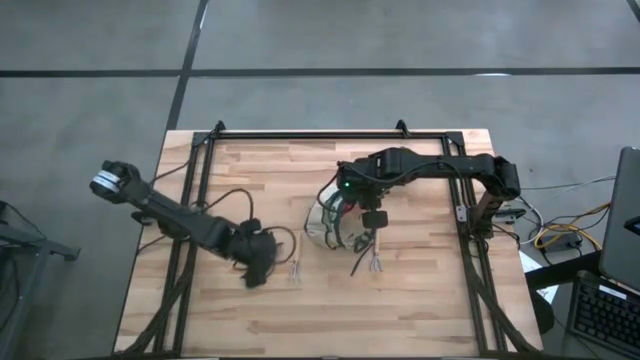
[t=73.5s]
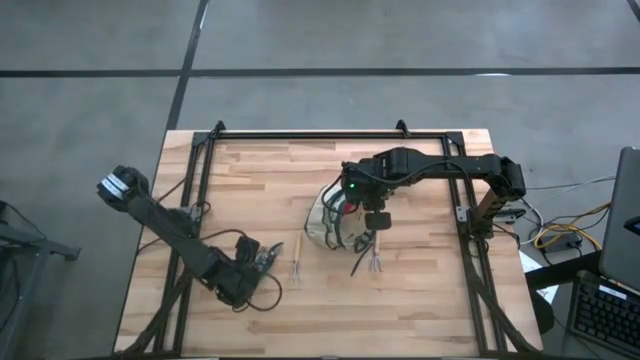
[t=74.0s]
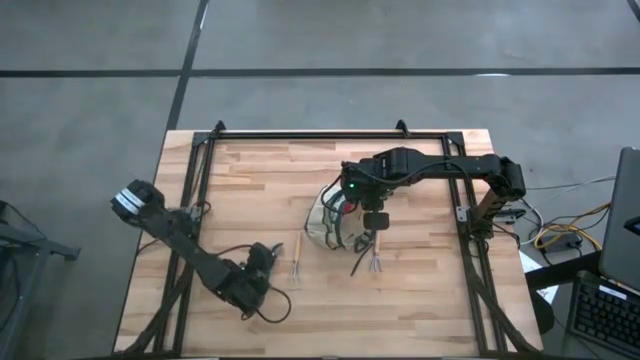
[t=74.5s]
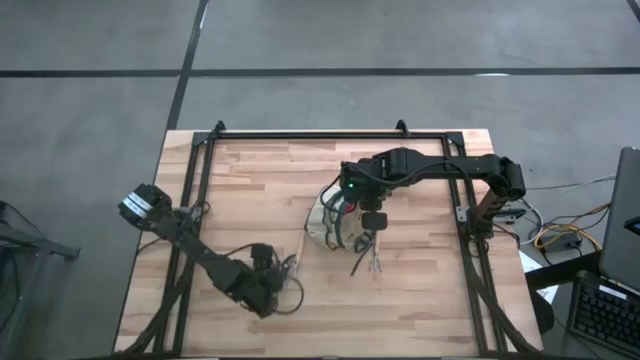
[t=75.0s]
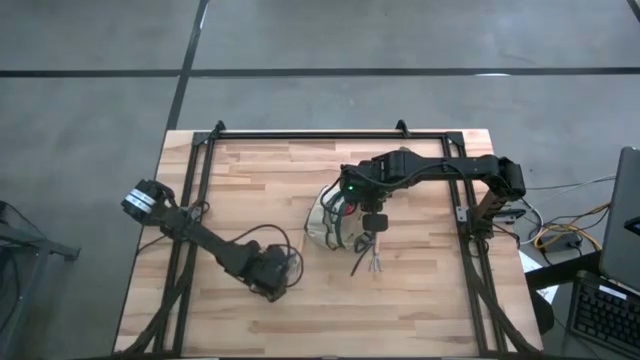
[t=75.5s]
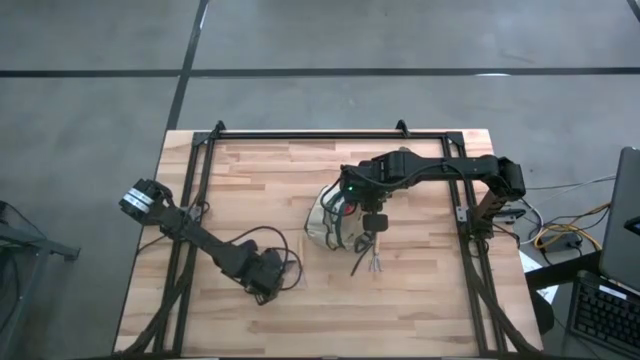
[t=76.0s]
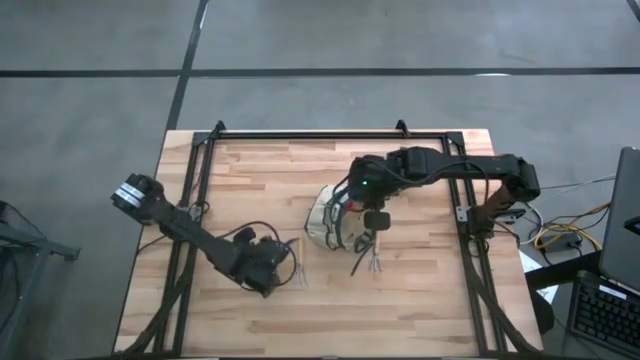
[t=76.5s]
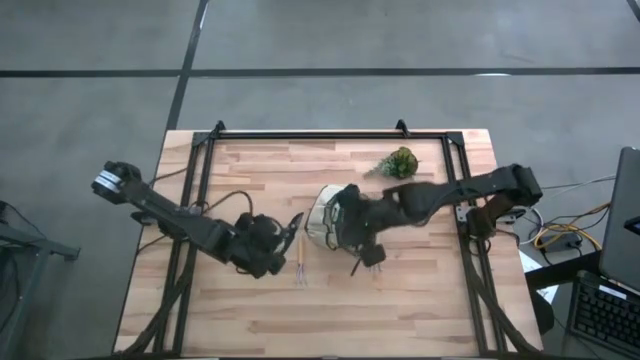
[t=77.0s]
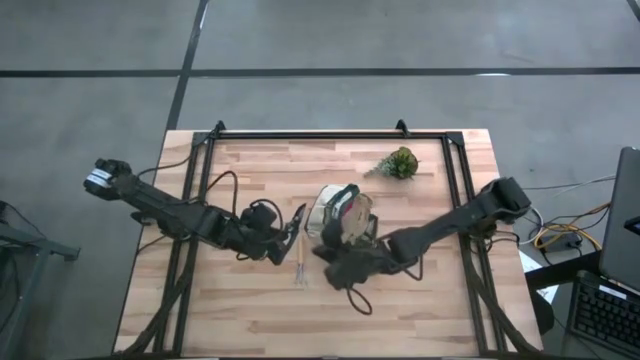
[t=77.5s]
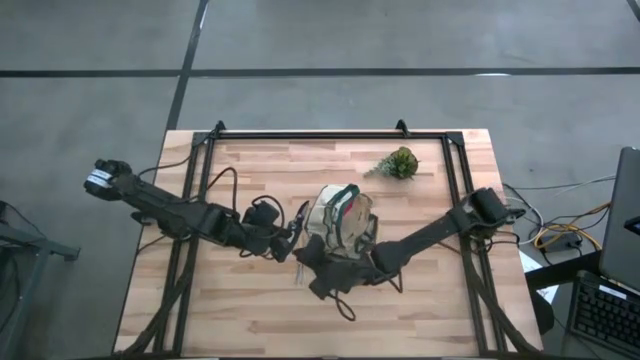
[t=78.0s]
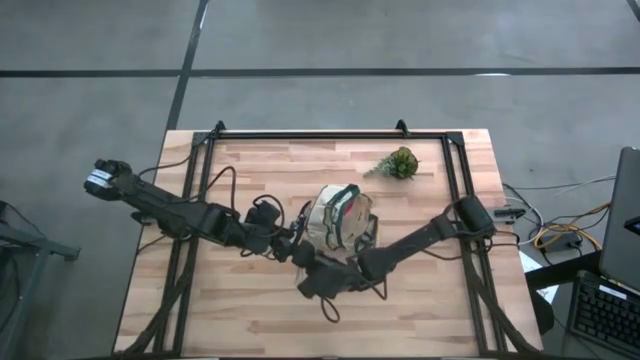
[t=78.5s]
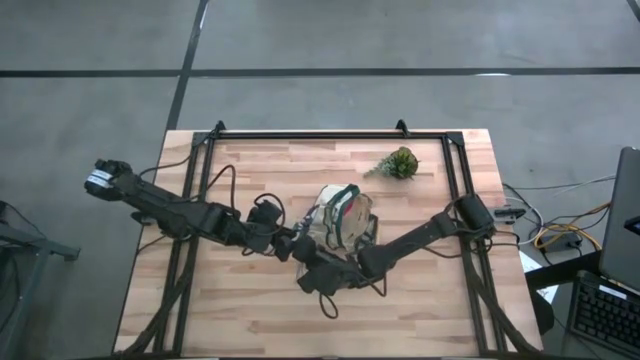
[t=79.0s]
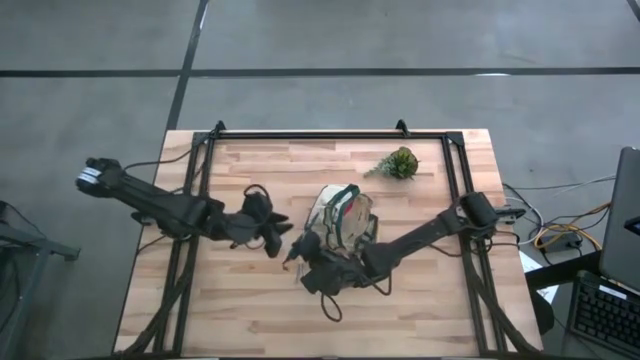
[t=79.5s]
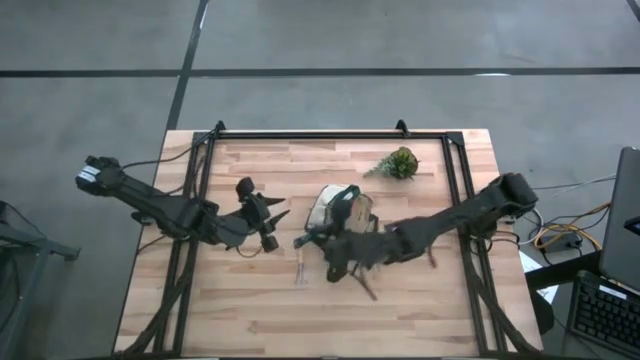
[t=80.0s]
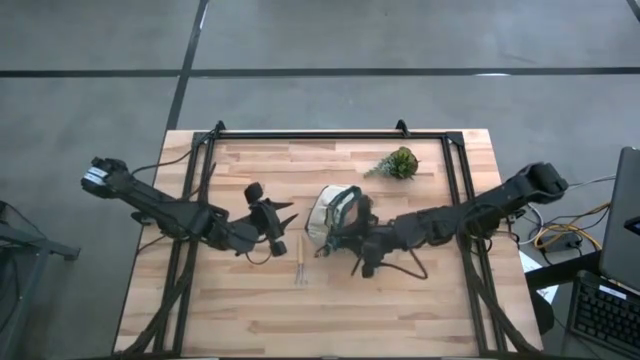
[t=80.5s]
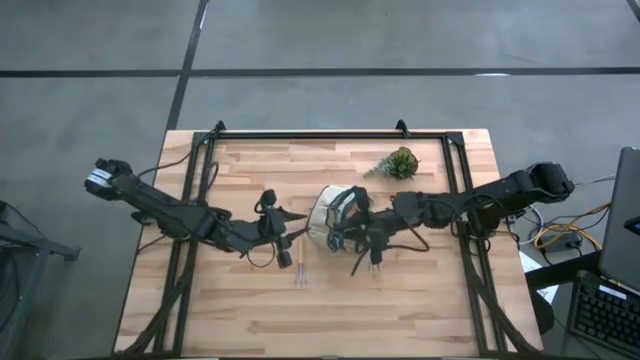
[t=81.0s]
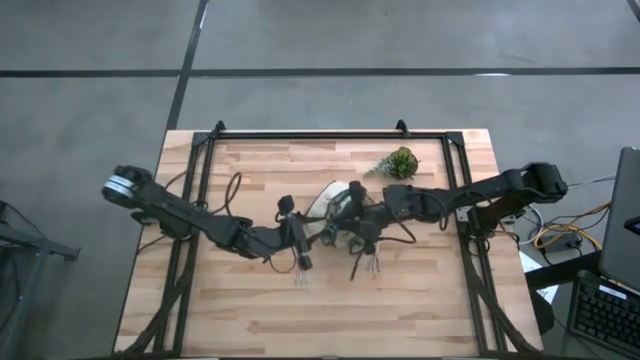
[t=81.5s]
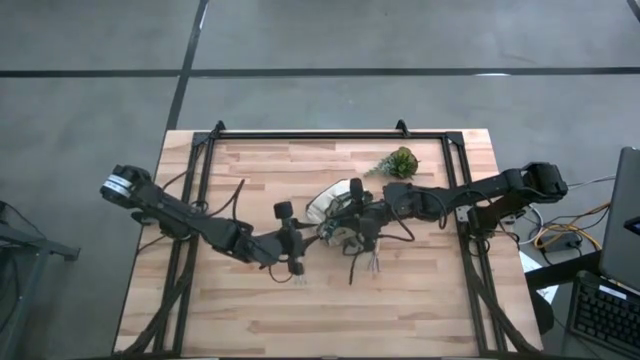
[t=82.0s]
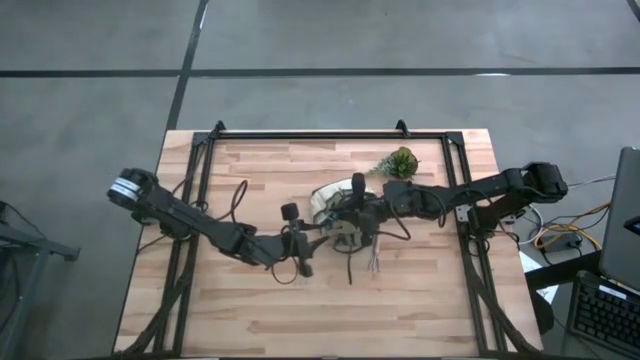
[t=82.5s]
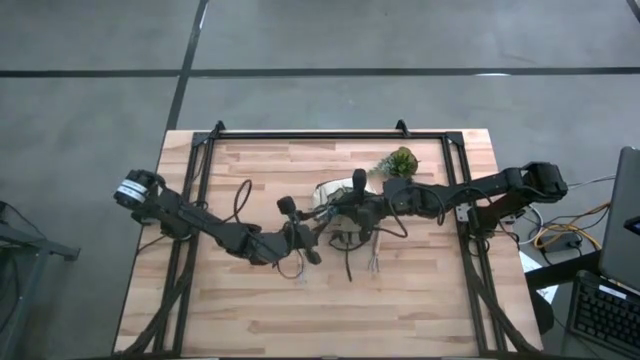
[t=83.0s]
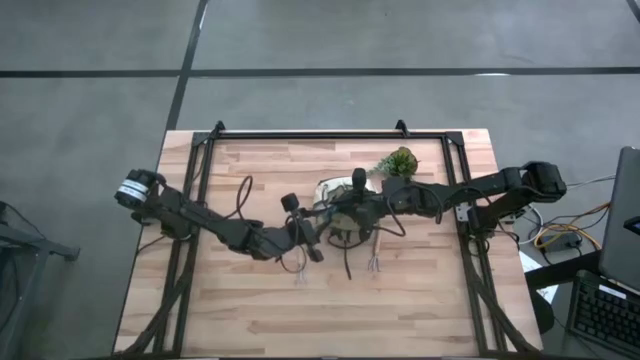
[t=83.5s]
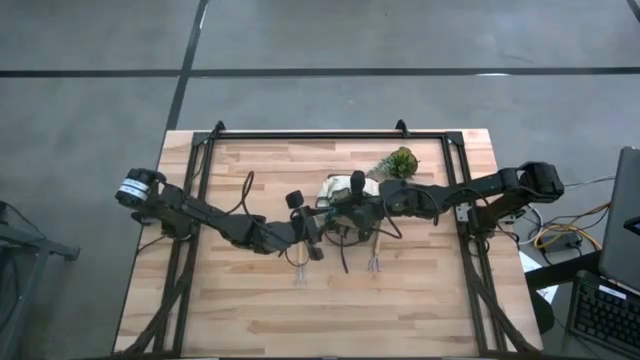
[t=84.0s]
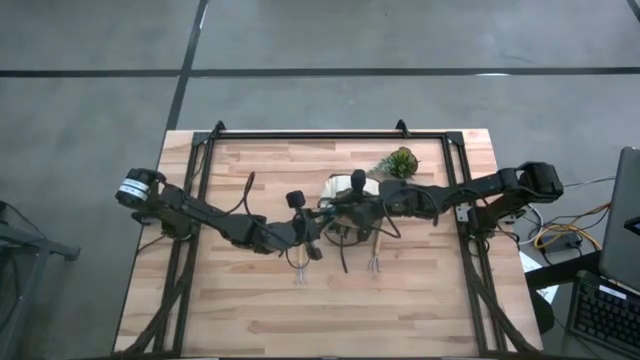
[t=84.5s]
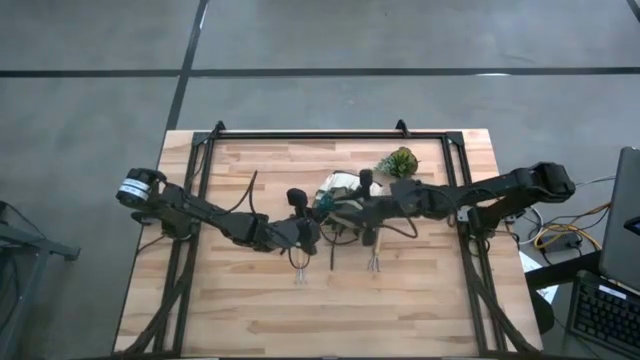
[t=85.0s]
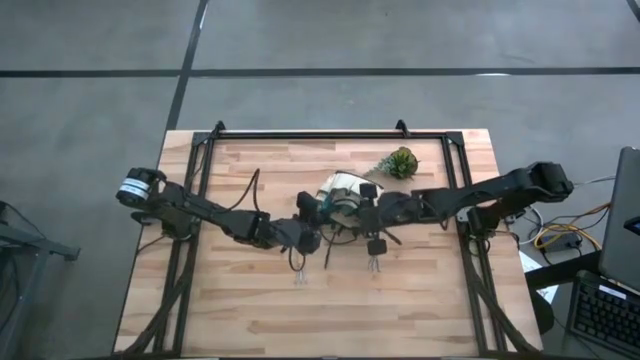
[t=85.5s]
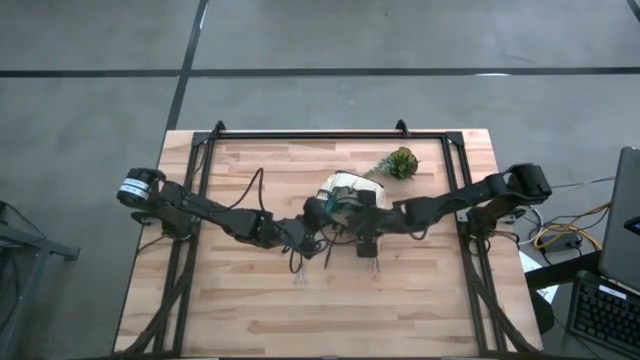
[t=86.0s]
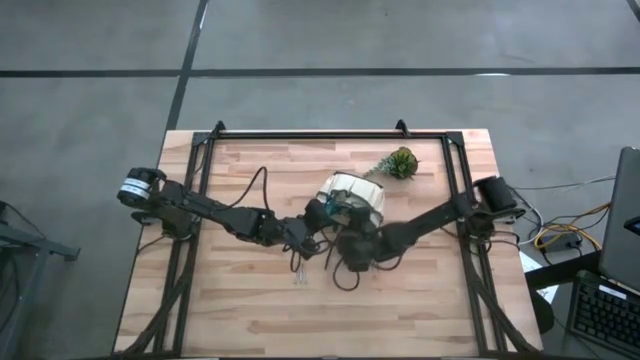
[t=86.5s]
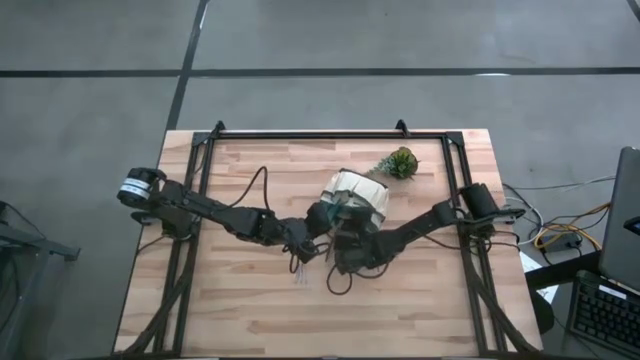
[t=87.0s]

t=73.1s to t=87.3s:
Task: Pick & Place Garden tools in Gardening bag
Put the shear scissors into the gardening bag
